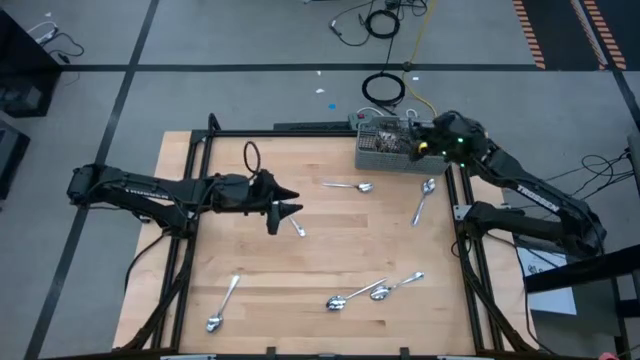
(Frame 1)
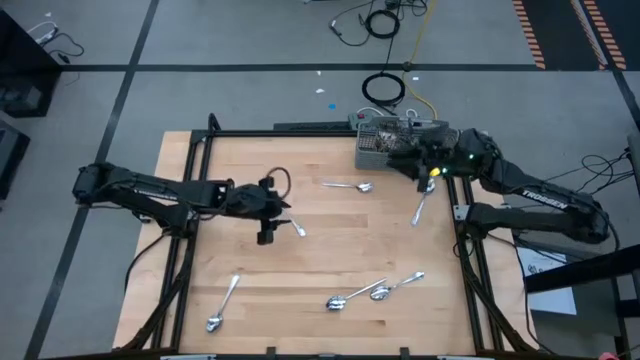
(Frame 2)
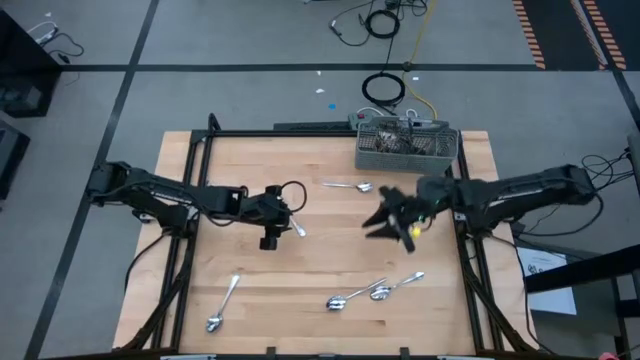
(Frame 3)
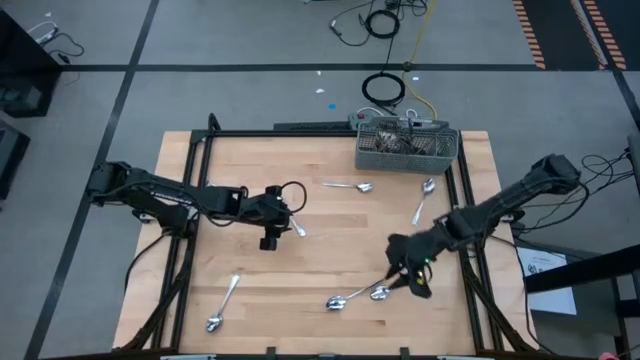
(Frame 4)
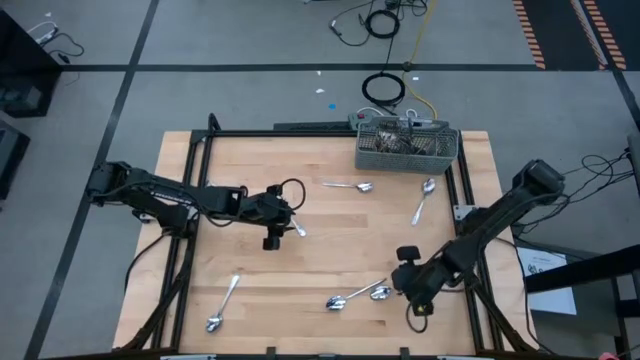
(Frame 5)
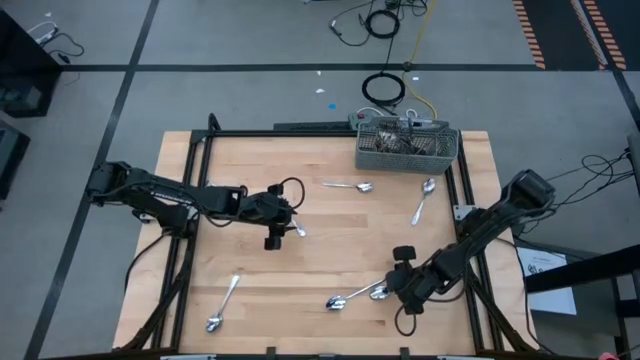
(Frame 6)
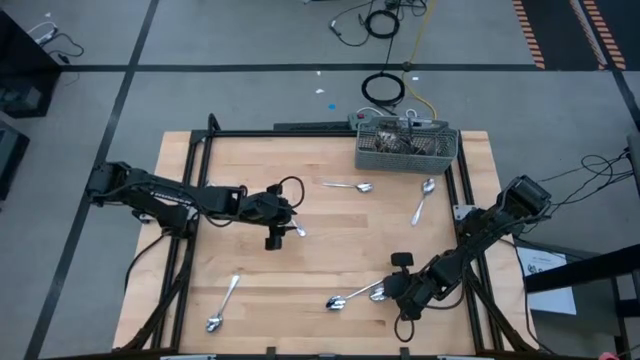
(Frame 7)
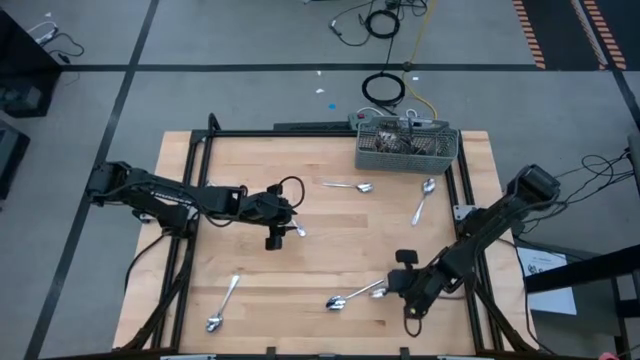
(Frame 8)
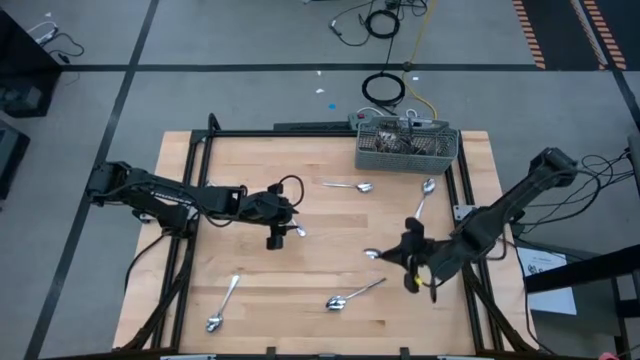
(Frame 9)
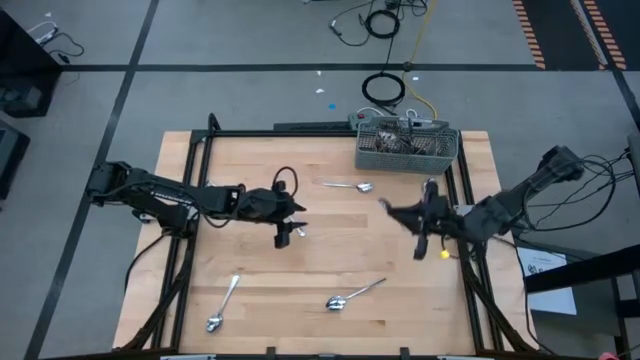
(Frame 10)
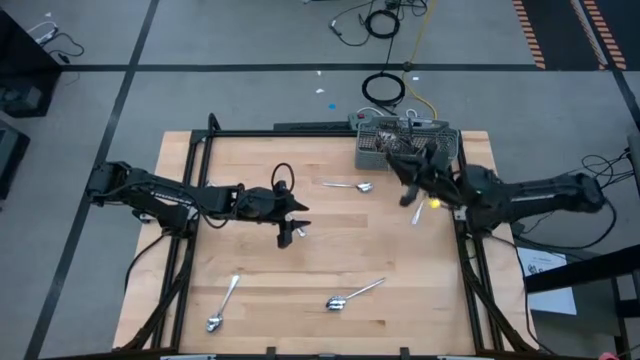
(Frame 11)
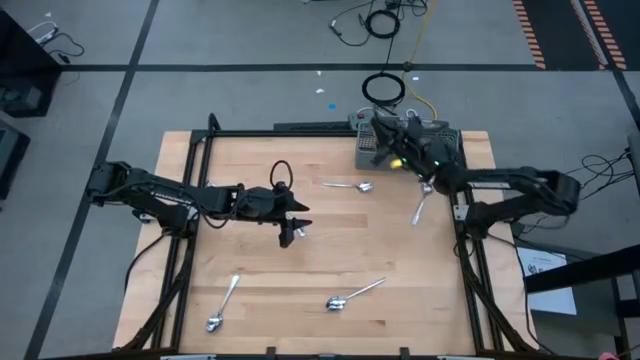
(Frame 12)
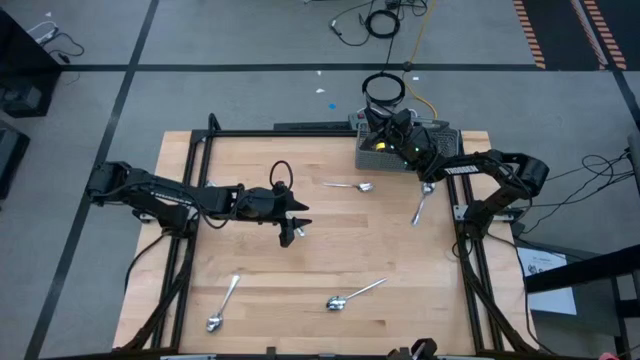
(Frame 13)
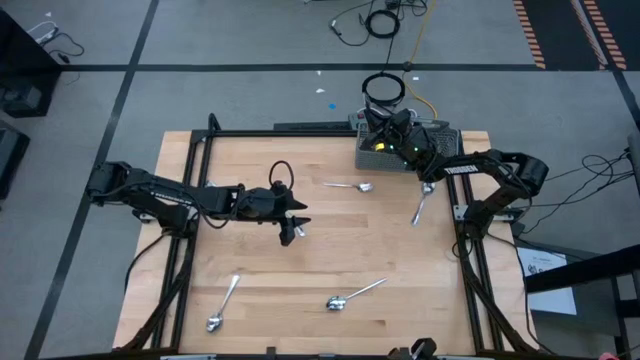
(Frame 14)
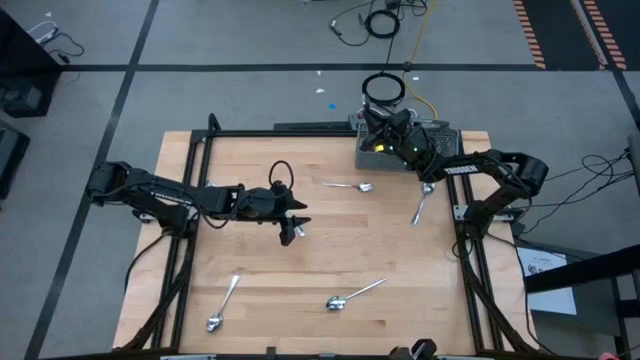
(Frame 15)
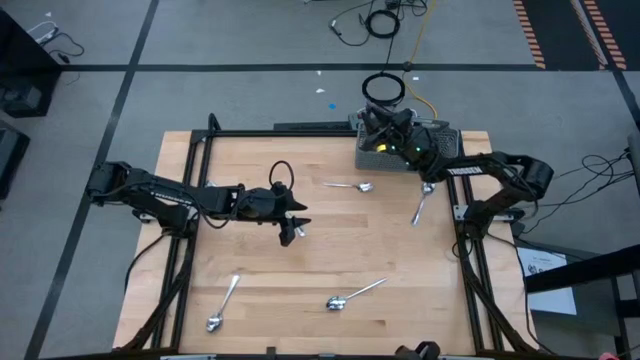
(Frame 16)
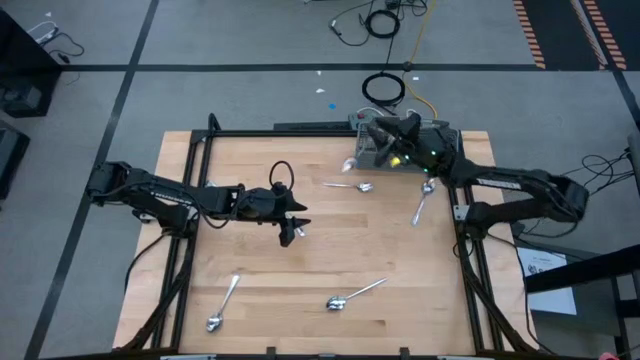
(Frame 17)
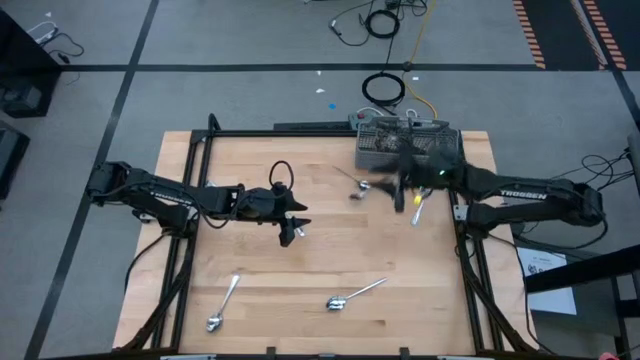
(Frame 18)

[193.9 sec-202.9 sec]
Task: Sort silverware
Put the silver spoon into the gray utensil holder

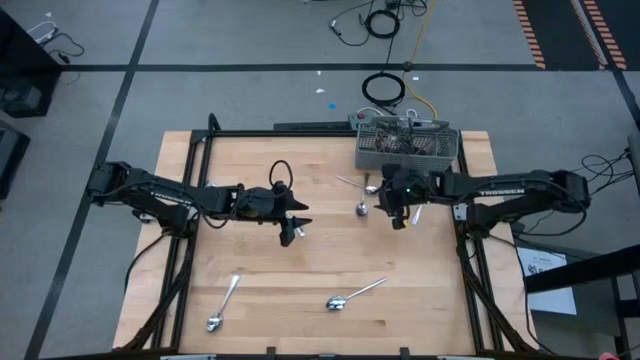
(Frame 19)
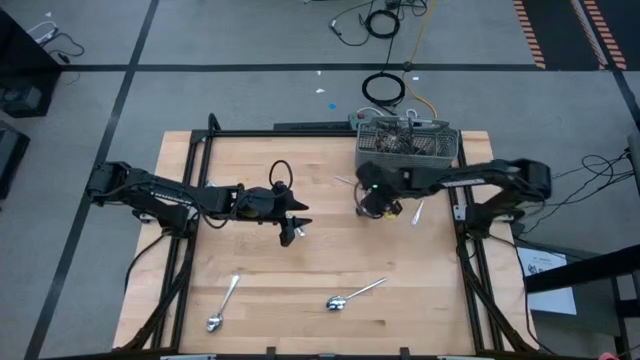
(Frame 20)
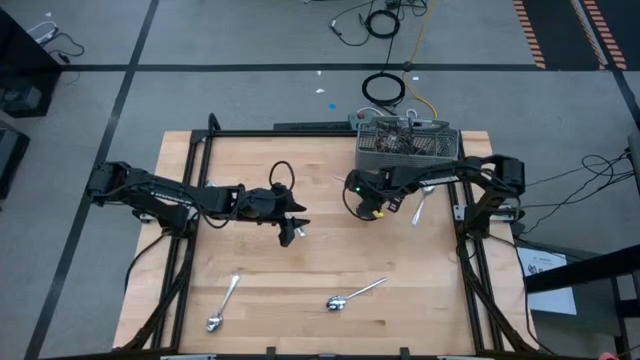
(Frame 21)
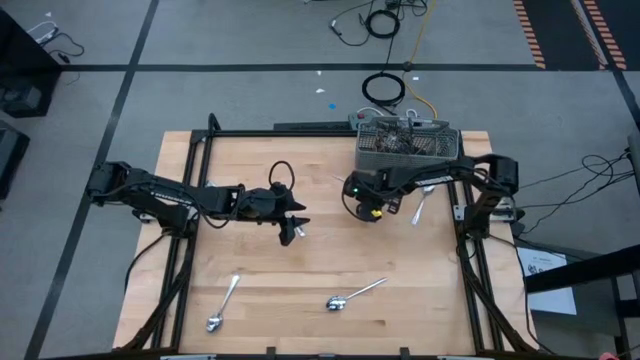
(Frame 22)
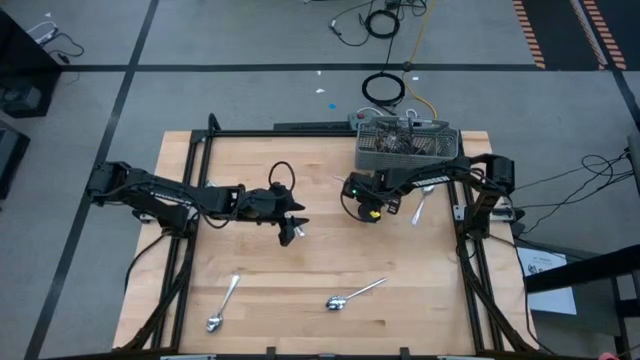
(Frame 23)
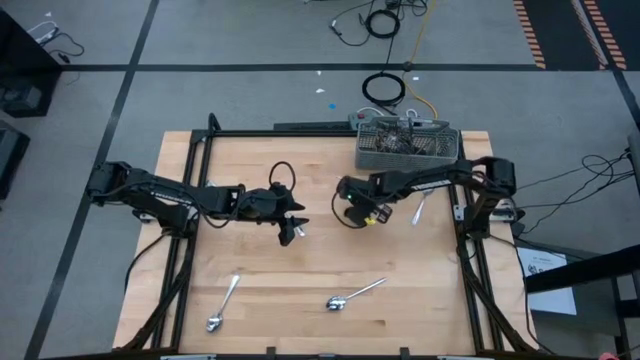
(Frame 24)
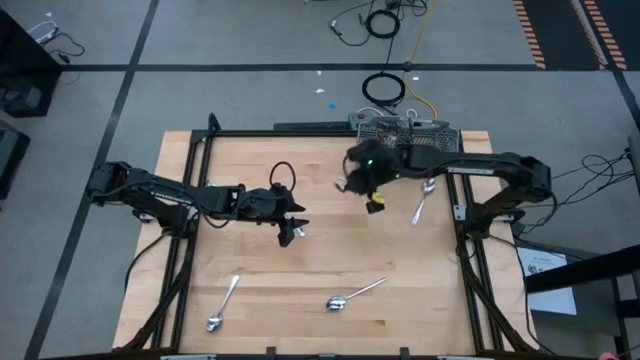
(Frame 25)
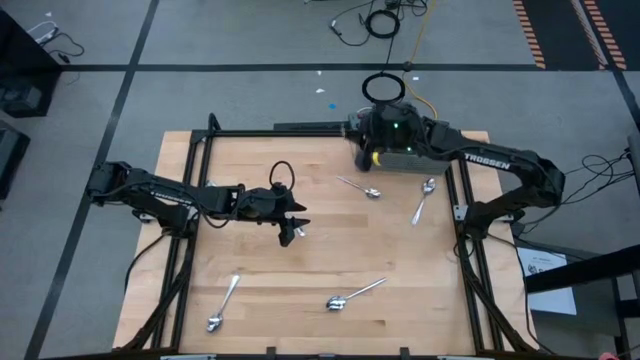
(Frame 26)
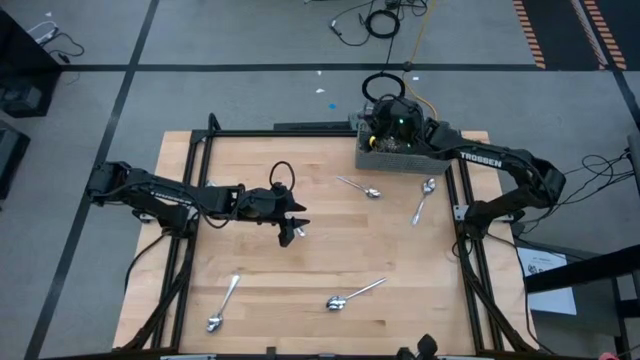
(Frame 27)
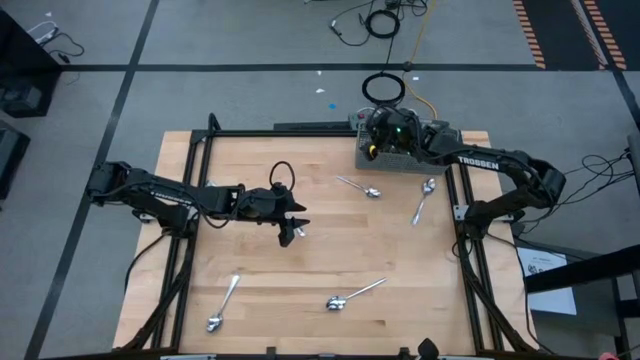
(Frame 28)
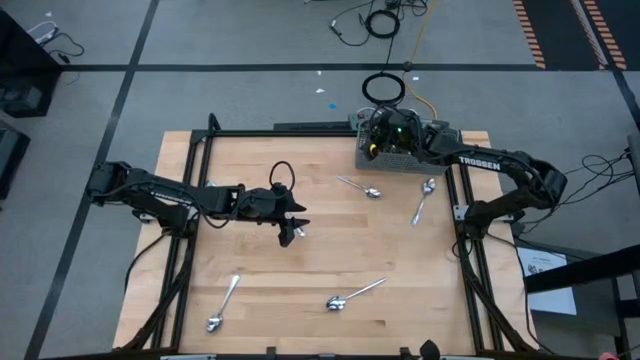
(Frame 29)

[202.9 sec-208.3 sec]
Put the silver spoon into the gray utensil holder

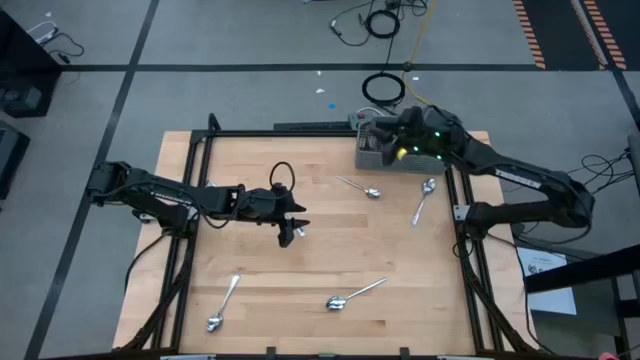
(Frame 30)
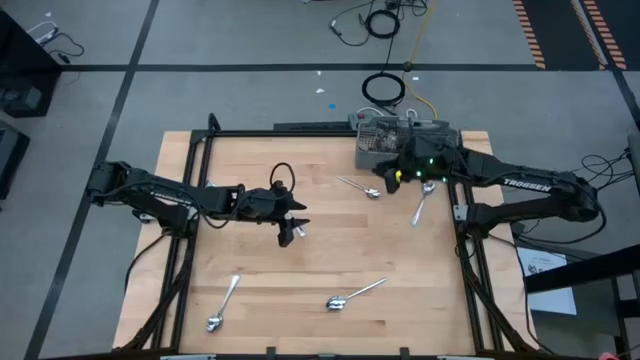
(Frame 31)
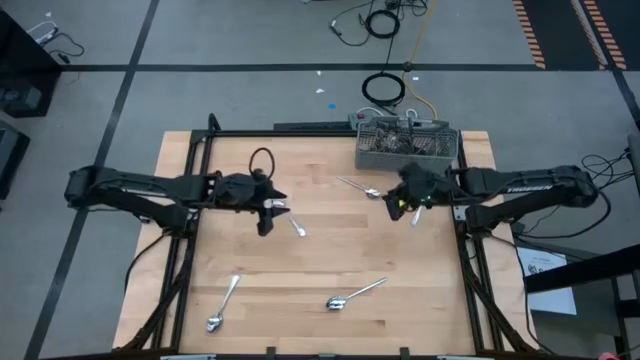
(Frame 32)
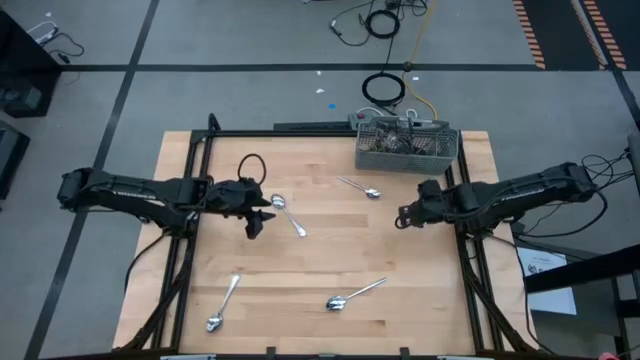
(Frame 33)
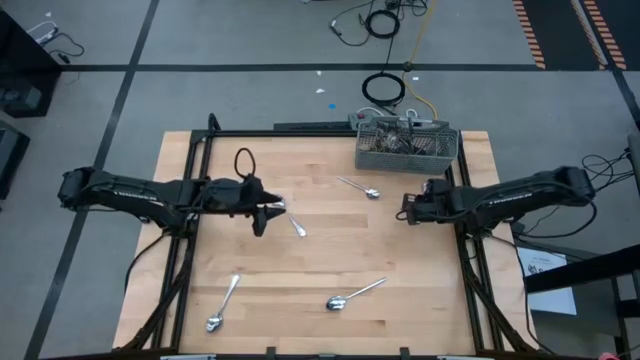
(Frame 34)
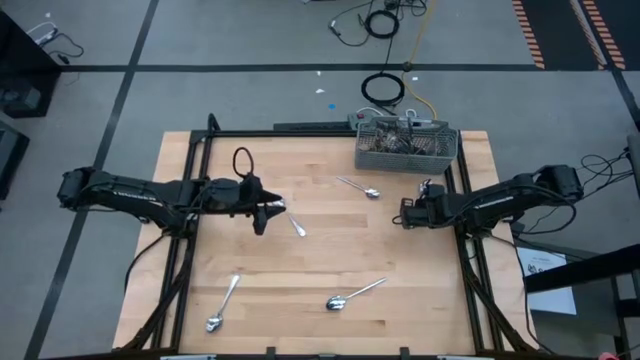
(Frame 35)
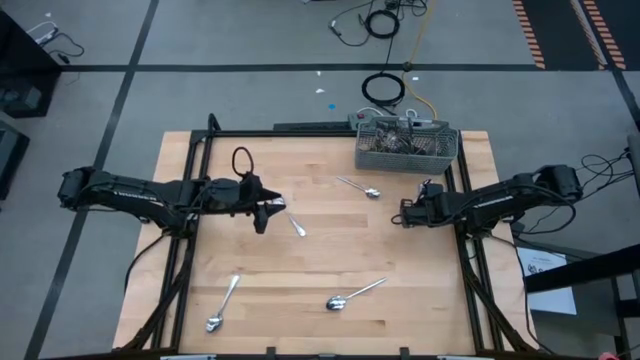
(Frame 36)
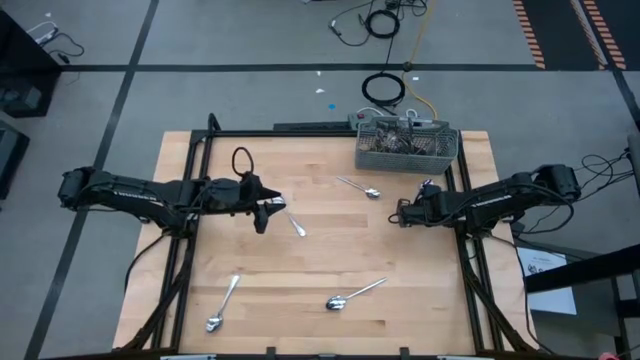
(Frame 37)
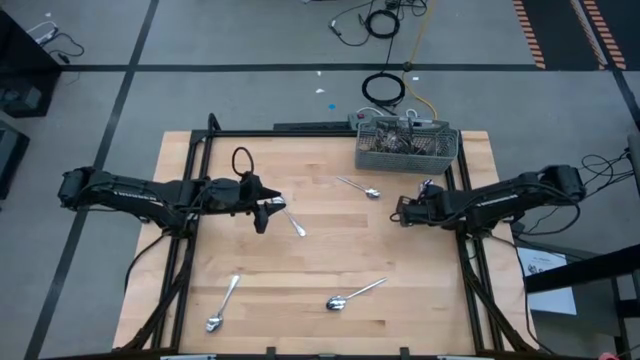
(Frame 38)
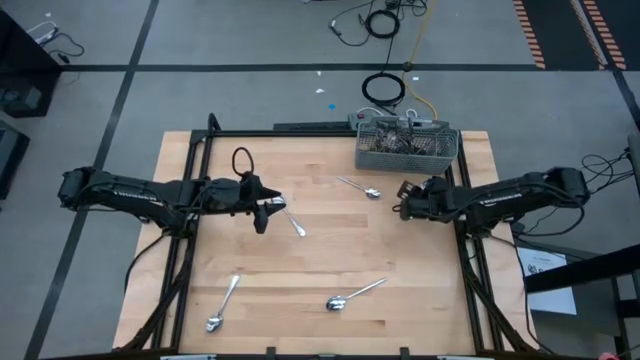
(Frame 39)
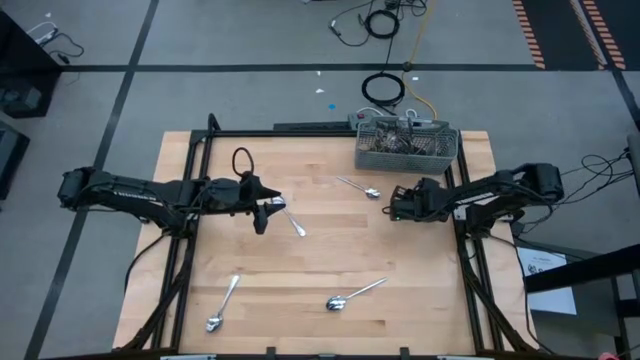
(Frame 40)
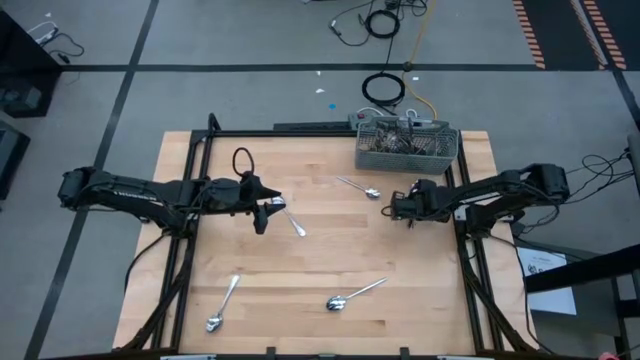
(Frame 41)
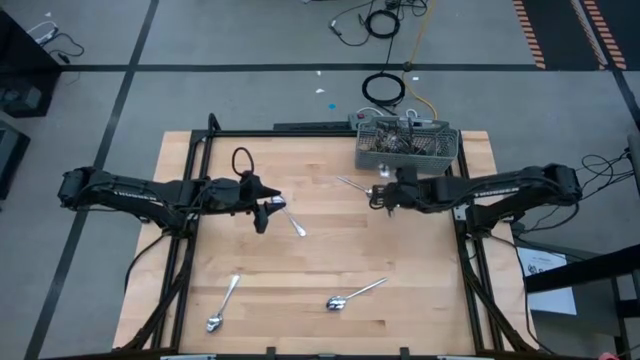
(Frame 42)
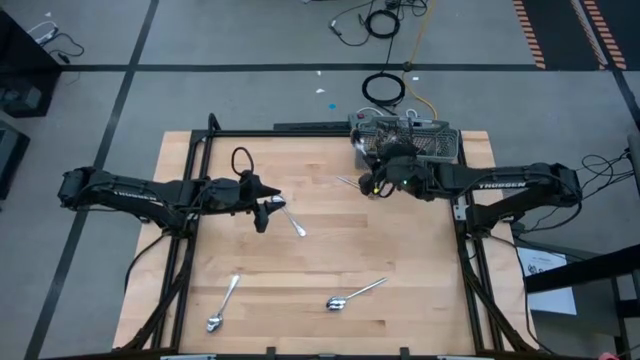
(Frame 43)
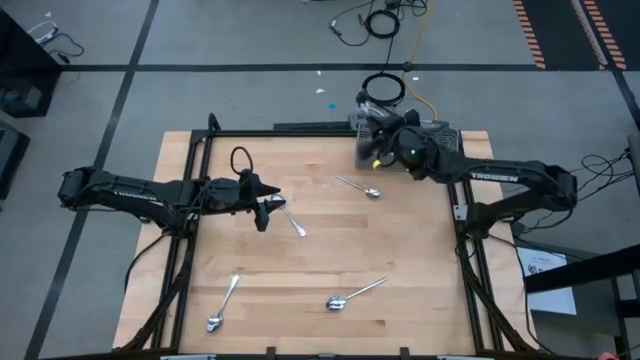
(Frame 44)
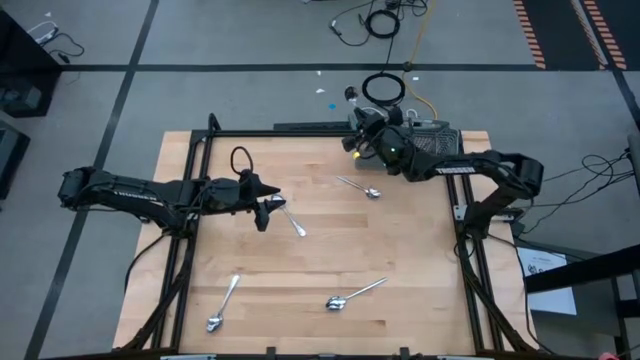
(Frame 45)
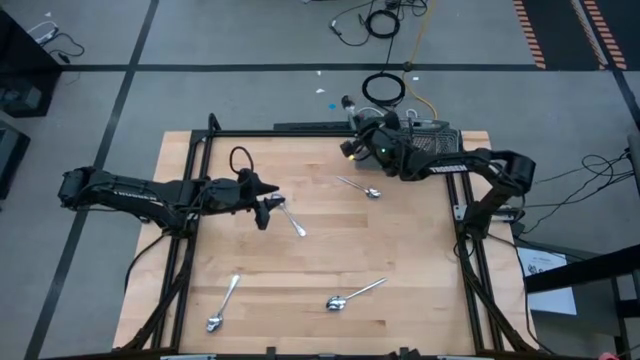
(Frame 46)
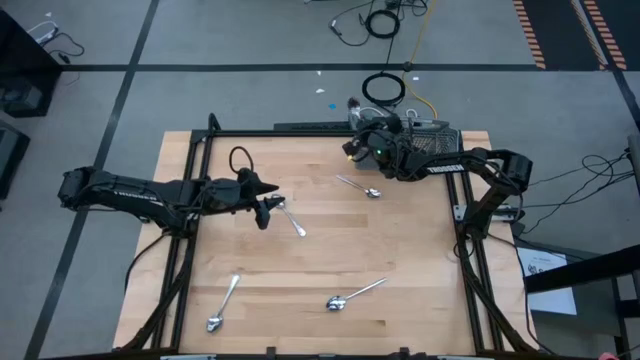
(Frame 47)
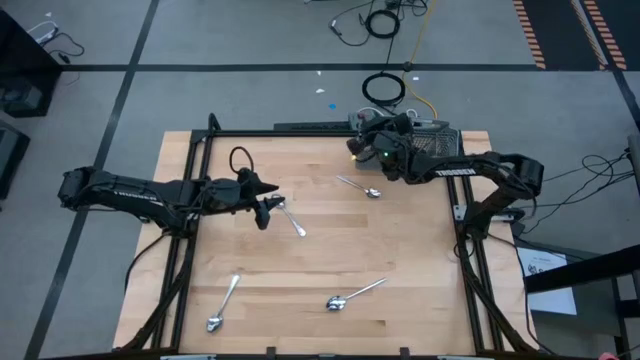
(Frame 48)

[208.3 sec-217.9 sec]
Put the silver spoon into the gray utensil holder
